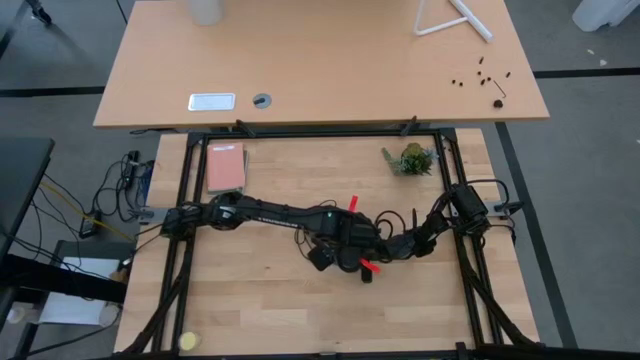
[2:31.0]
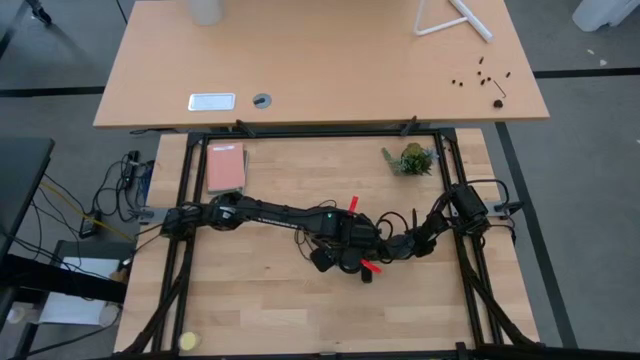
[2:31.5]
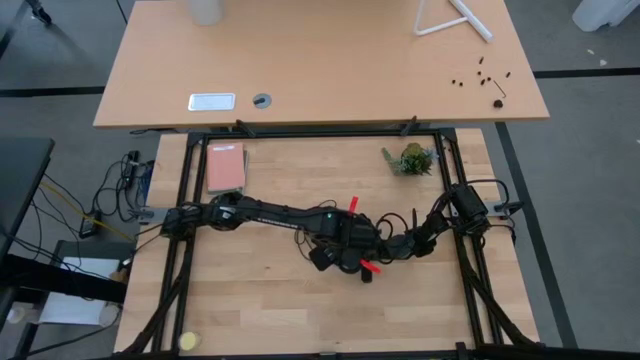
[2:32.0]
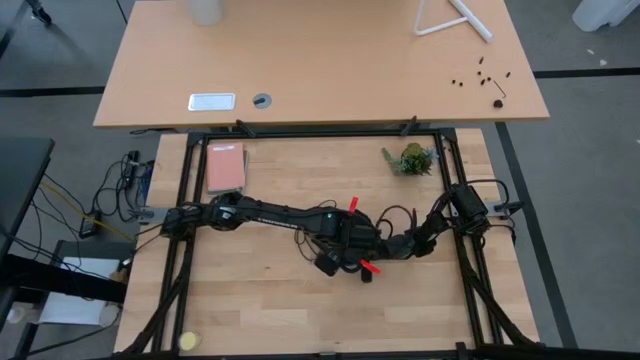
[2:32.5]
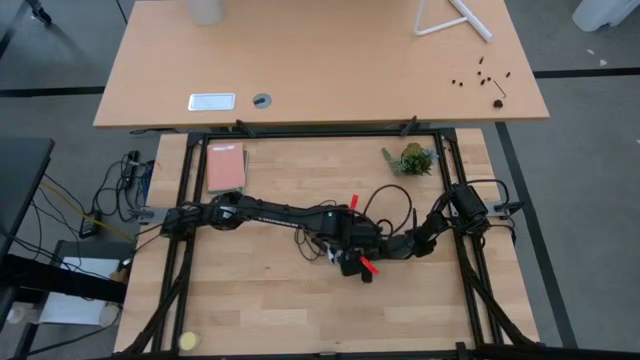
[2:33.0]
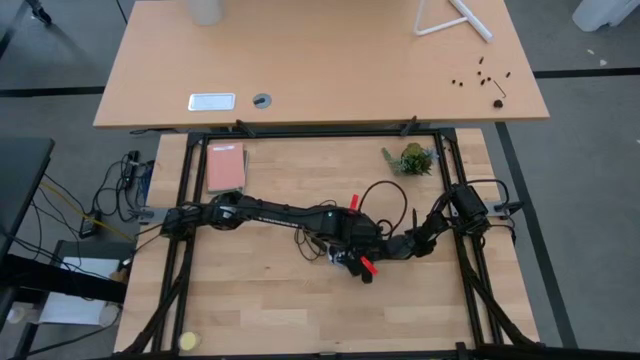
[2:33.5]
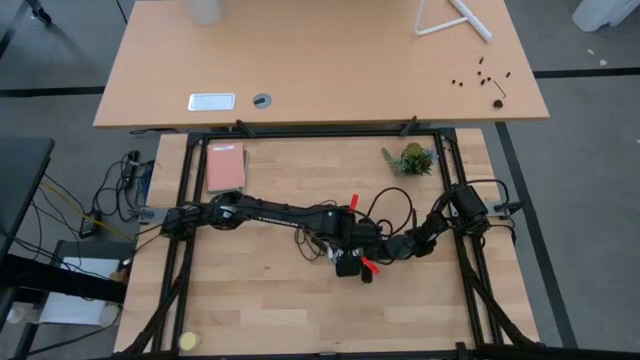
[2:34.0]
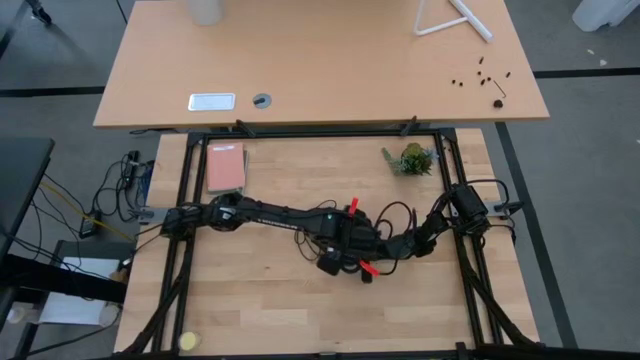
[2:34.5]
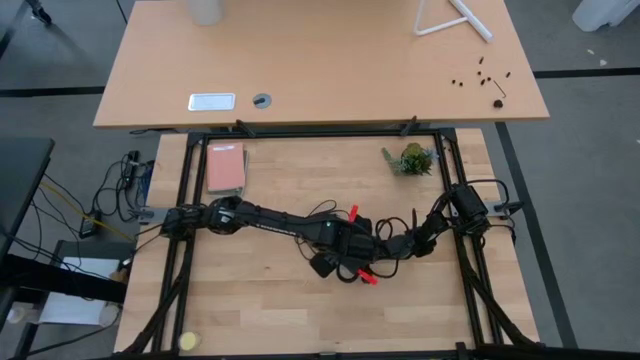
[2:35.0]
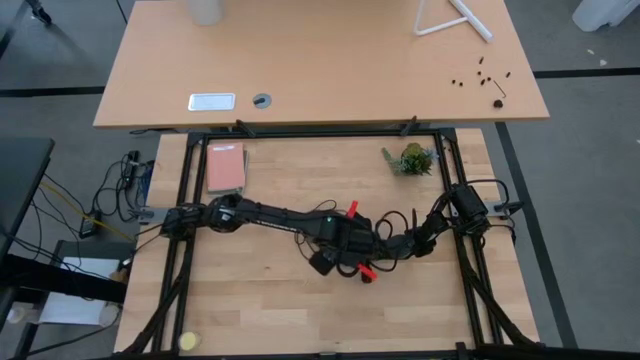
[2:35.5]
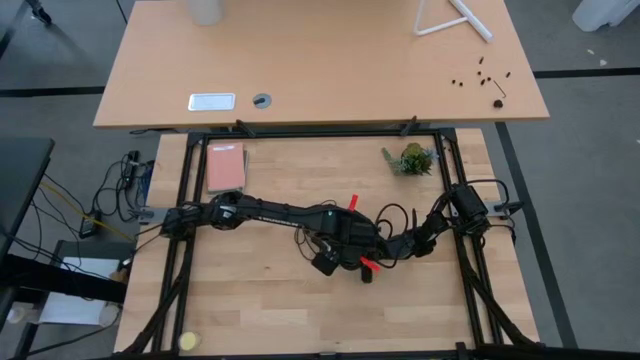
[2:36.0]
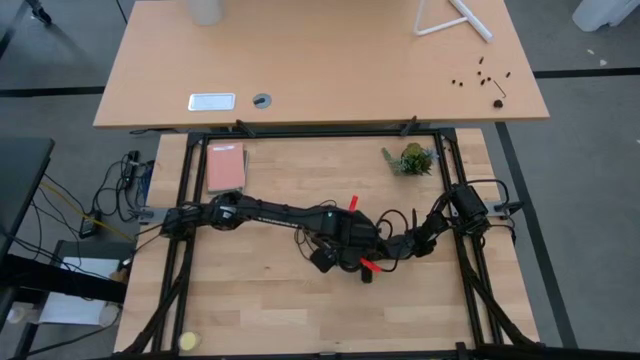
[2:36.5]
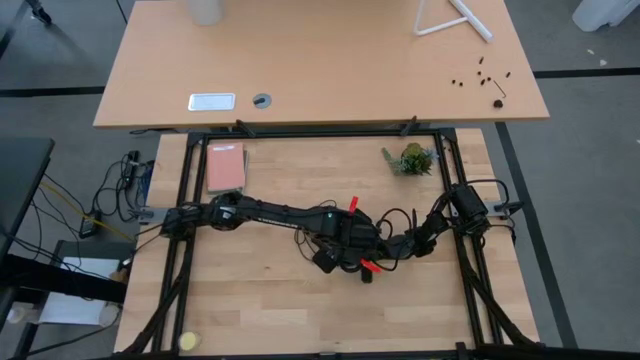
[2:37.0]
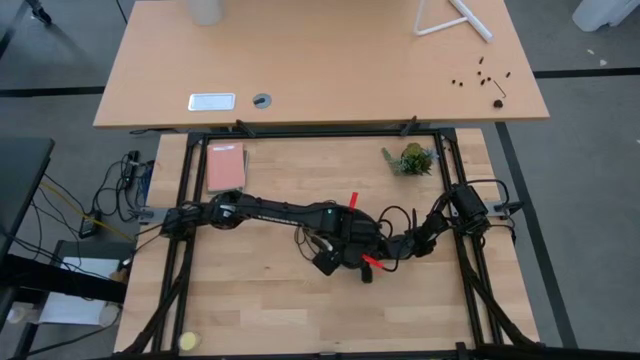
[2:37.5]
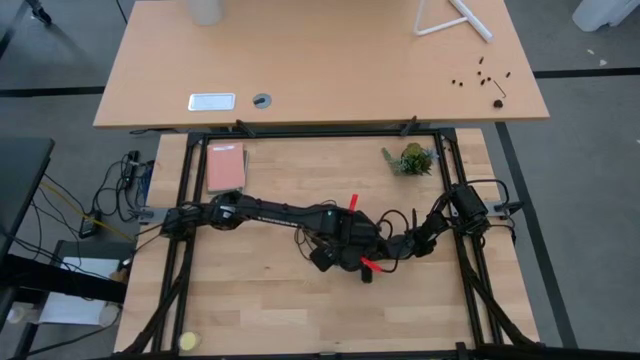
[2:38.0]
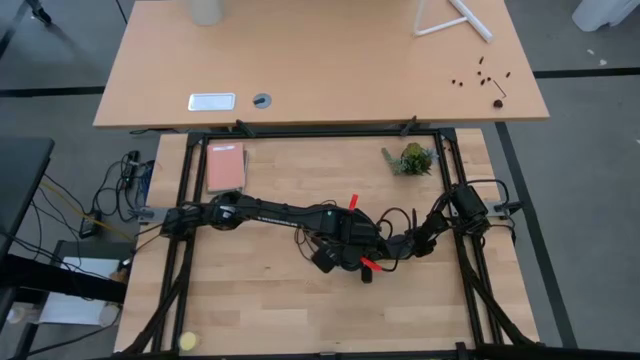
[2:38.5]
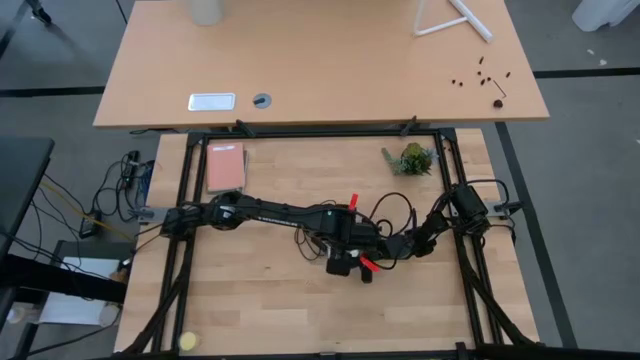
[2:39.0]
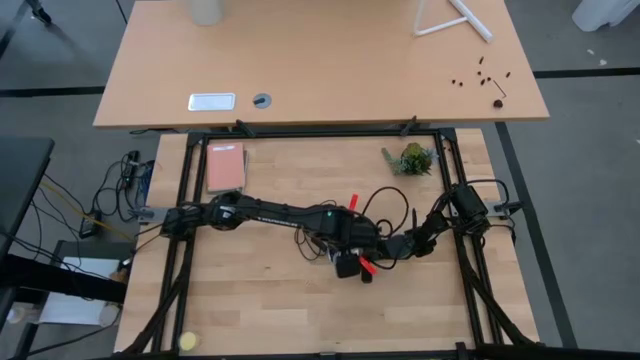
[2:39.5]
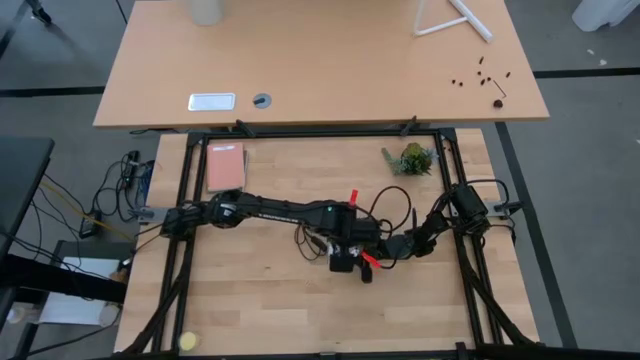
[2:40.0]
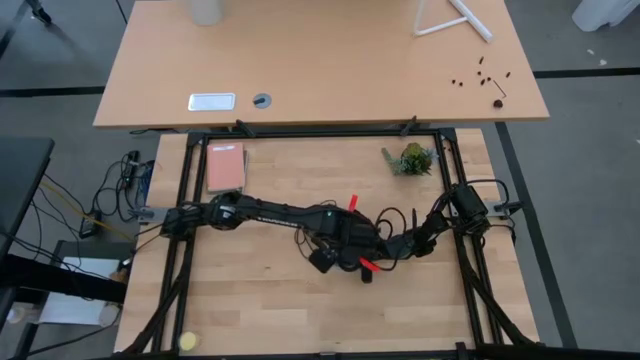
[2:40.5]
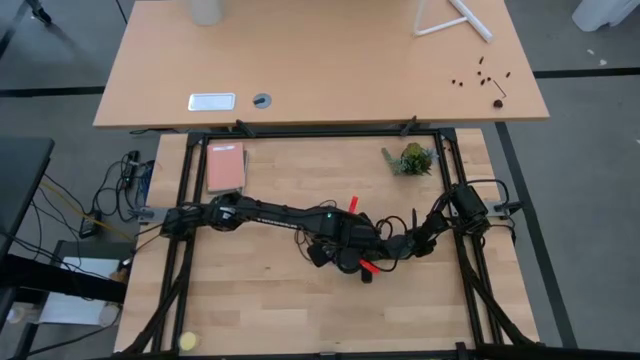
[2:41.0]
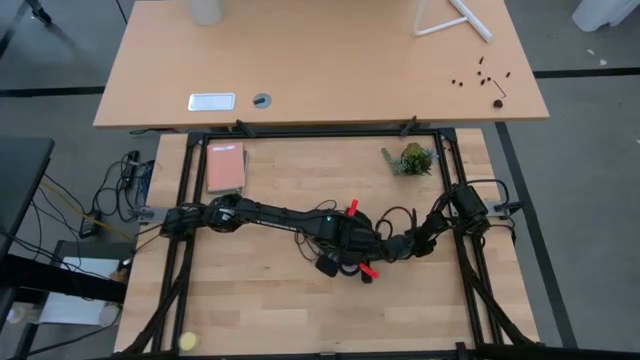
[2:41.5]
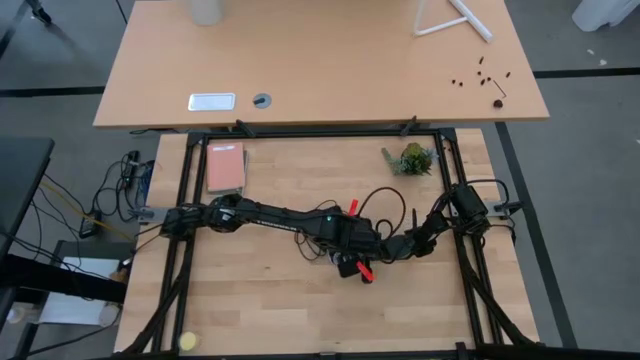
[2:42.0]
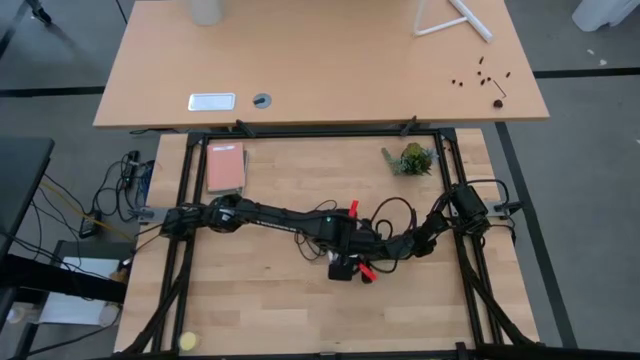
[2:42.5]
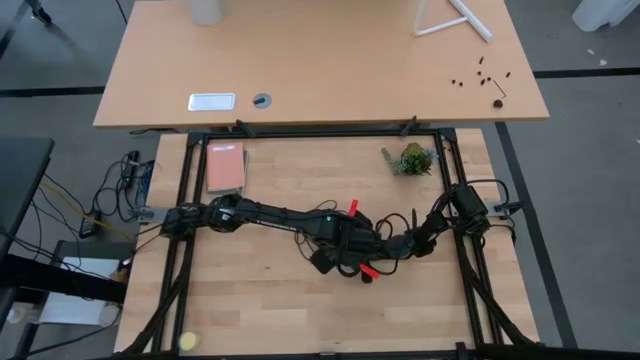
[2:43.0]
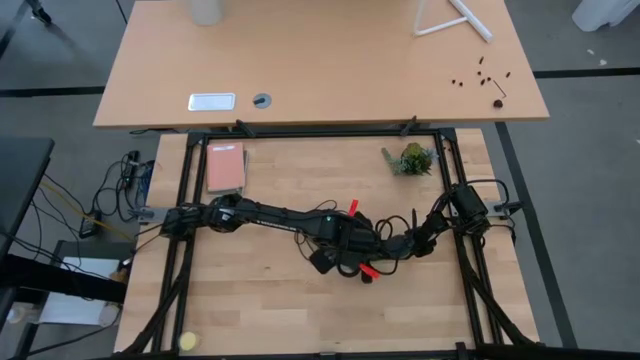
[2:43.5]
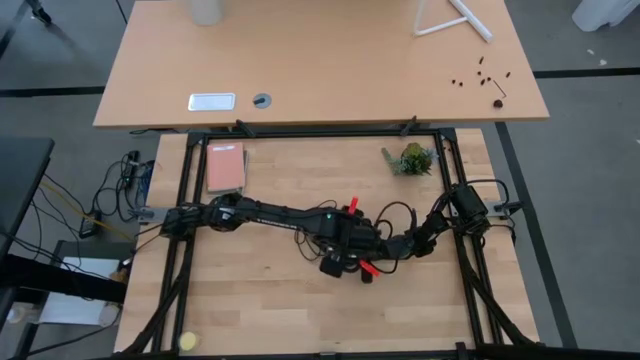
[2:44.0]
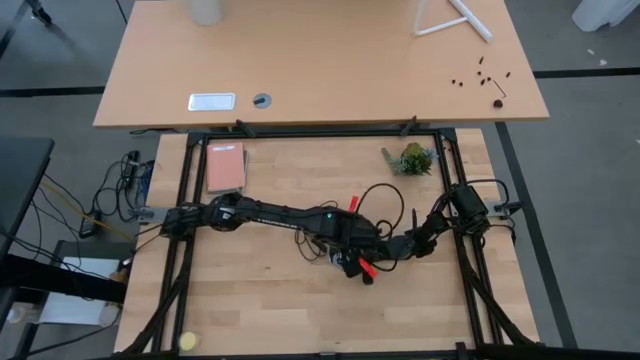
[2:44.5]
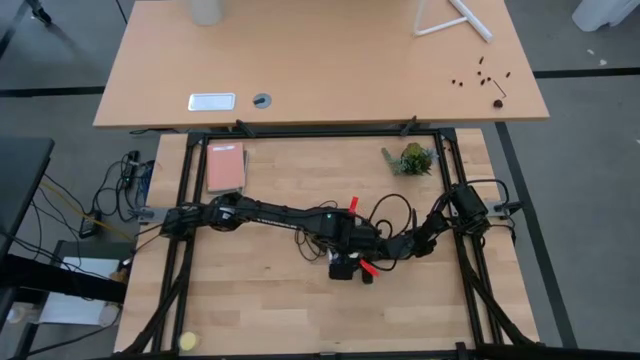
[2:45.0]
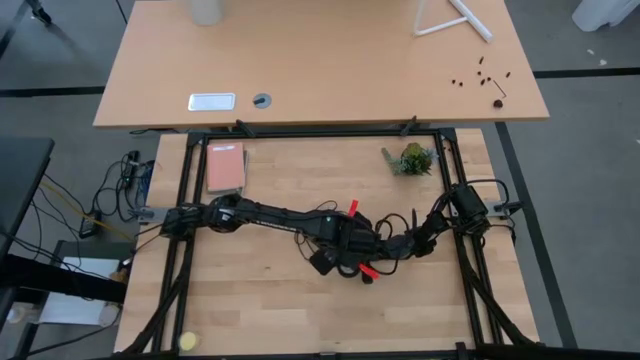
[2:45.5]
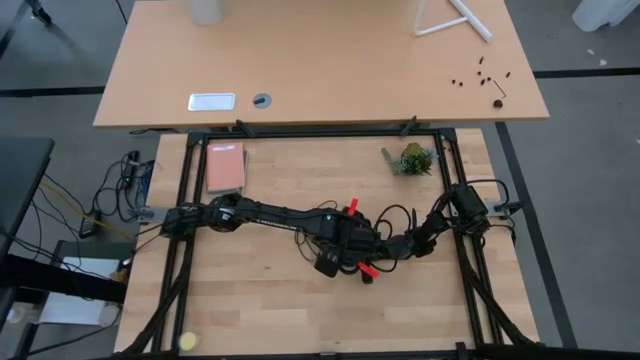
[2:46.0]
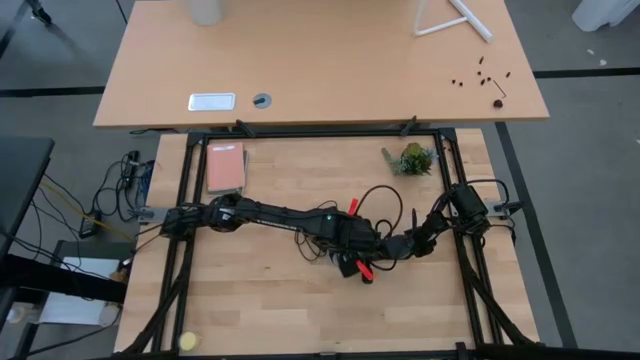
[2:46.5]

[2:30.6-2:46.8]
Task: Screw lightbulb
Remove the lightbulb from the lamp

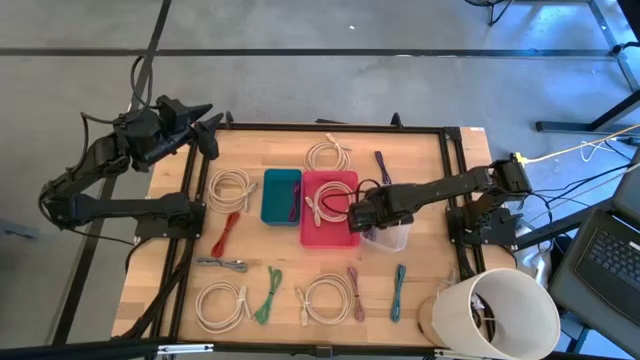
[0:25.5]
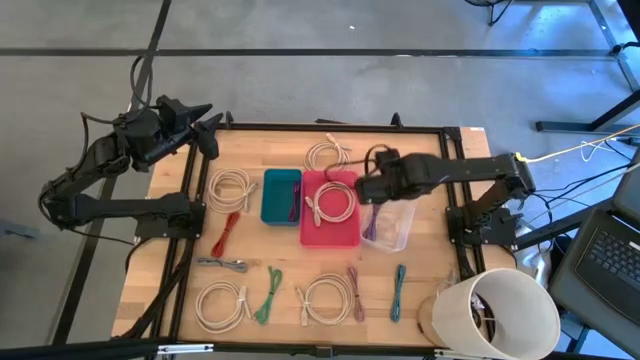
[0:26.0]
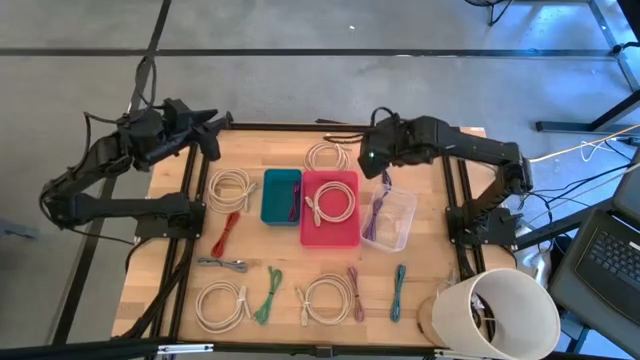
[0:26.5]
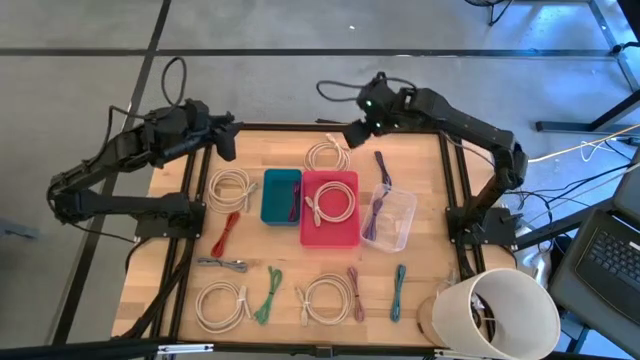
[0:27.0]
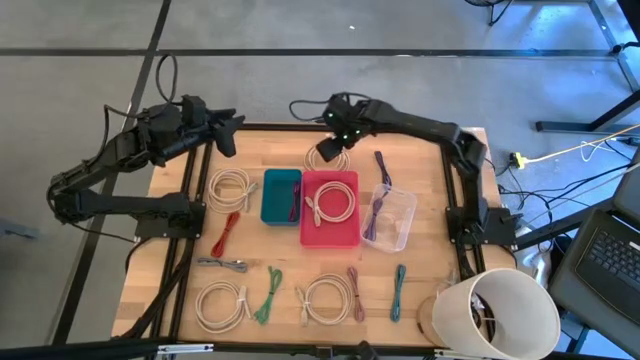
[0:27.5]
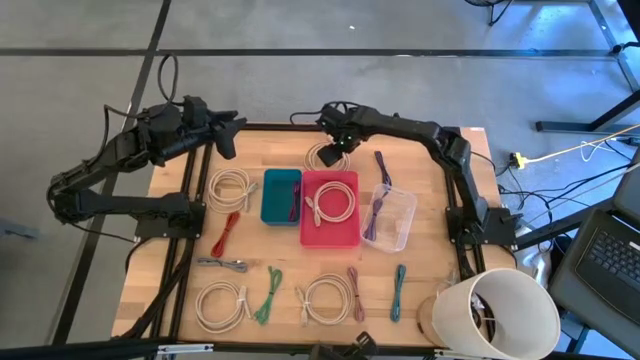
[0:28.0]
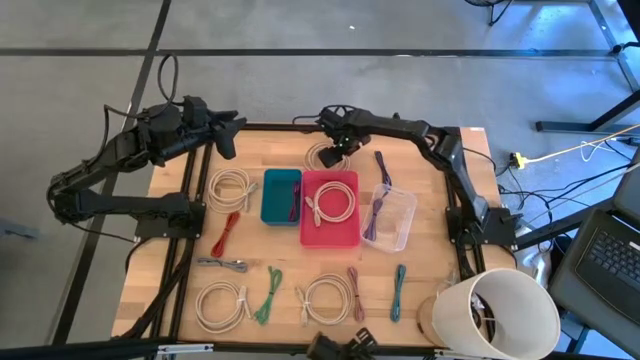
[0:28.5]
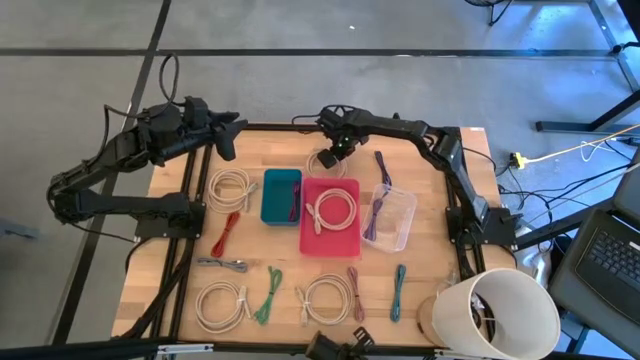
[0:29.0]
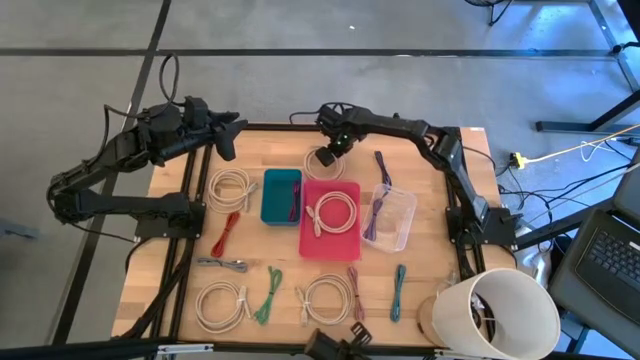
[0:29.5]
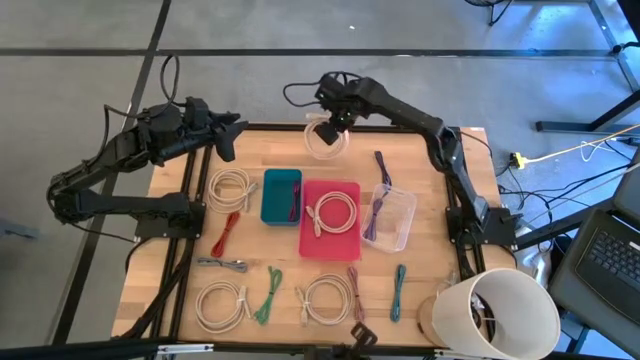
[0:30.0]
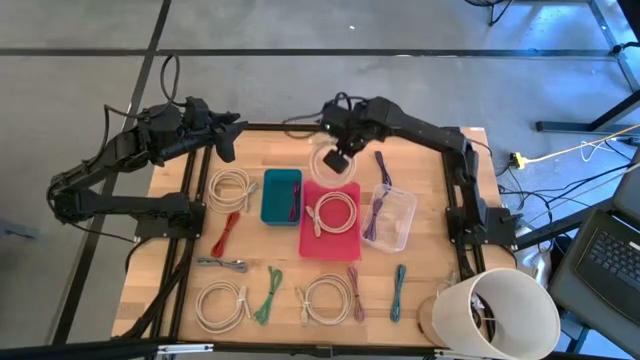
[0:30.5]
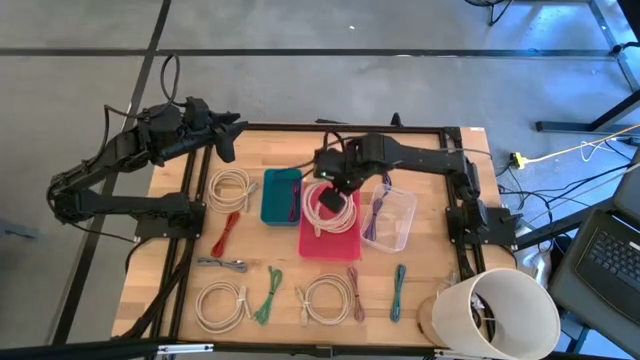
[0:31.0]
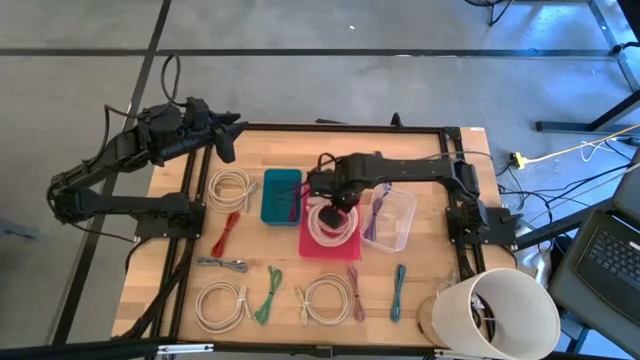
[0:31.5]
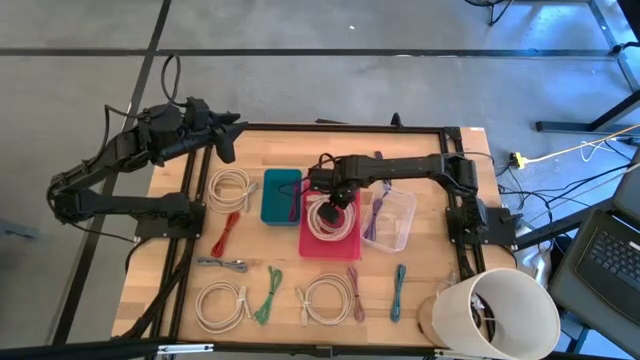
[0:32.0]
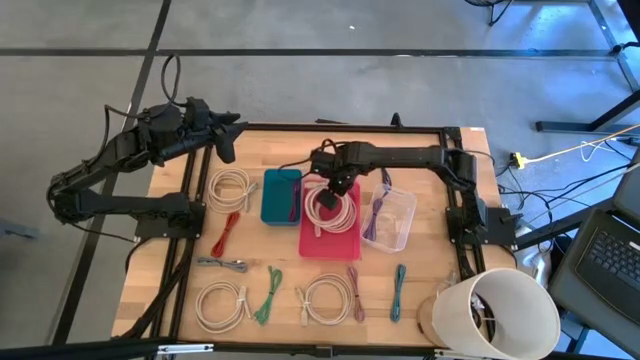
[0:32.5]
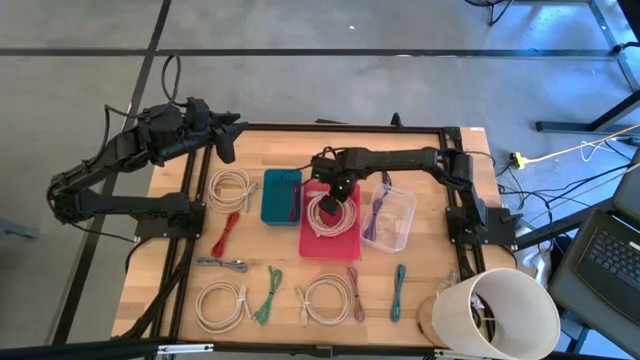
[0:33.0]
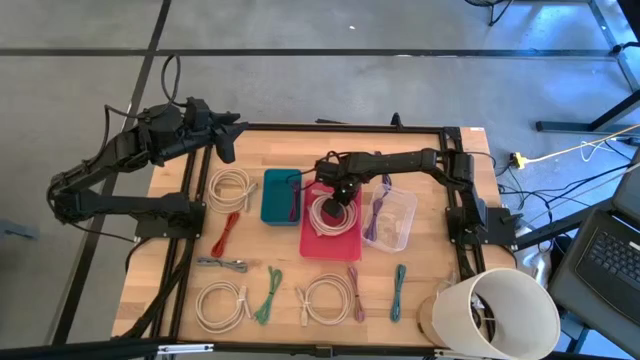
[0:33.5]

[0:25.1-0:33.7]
Task: Pick & Place USB Port
Put the white charger cable into the pink bin
